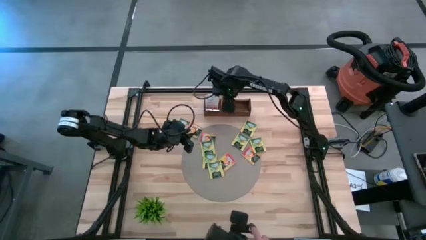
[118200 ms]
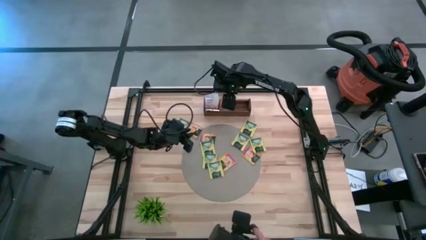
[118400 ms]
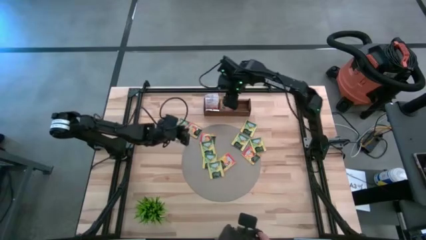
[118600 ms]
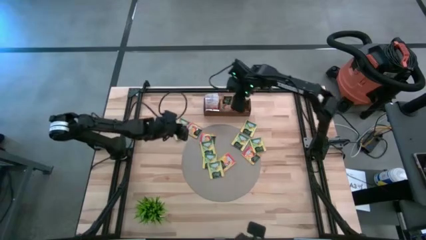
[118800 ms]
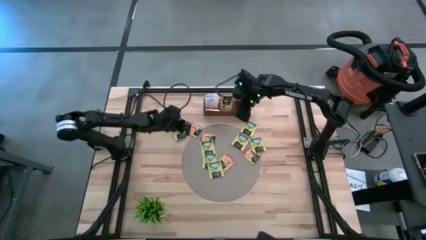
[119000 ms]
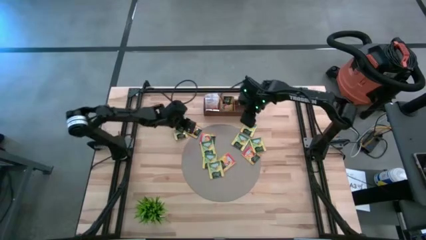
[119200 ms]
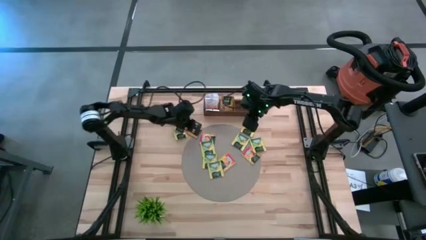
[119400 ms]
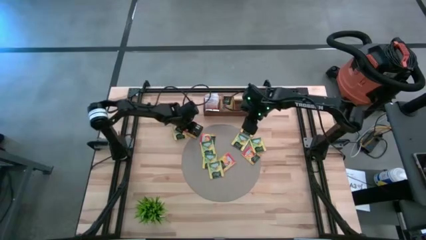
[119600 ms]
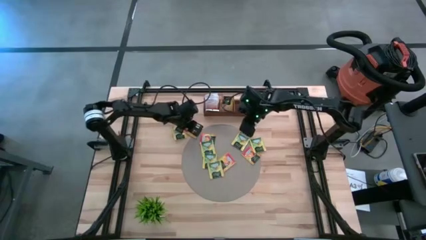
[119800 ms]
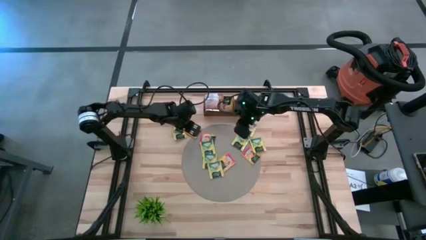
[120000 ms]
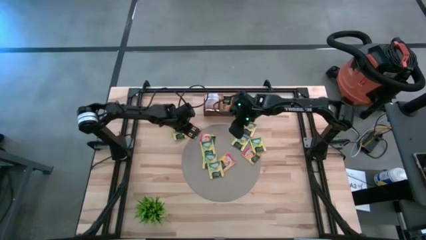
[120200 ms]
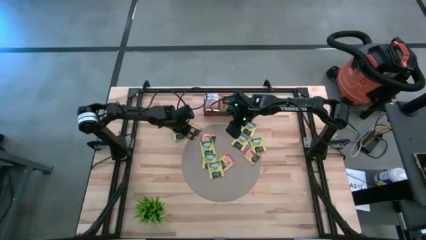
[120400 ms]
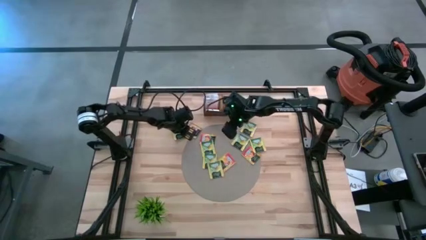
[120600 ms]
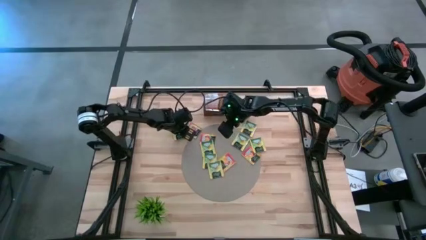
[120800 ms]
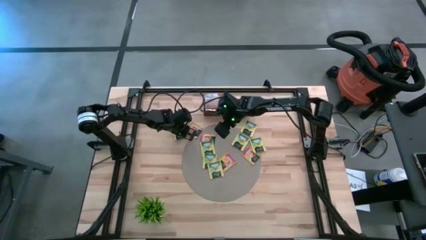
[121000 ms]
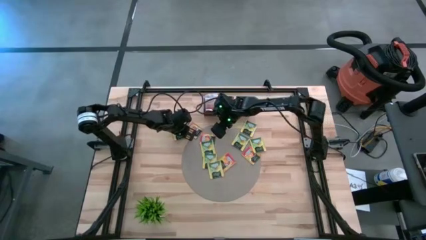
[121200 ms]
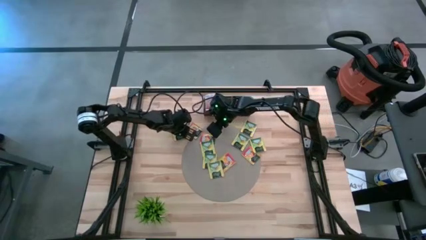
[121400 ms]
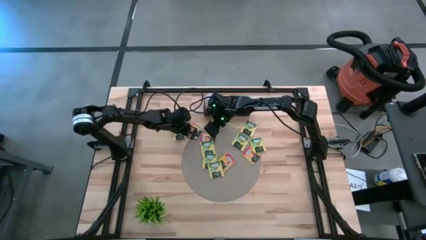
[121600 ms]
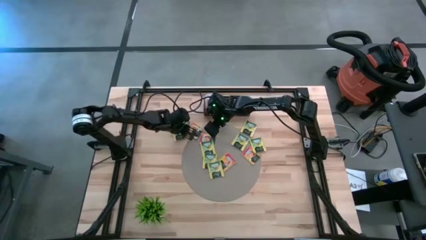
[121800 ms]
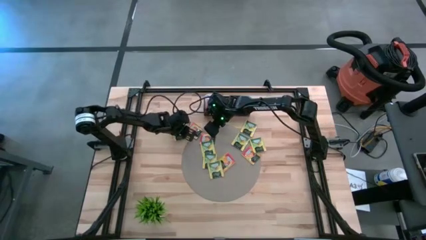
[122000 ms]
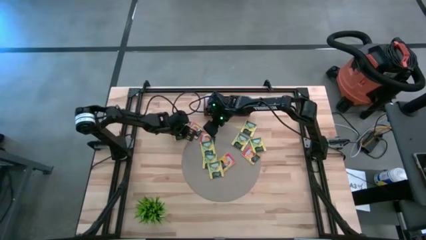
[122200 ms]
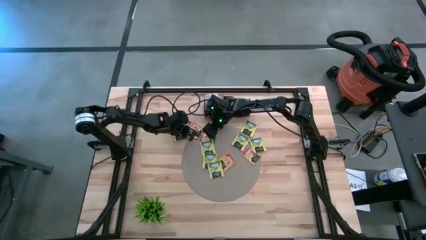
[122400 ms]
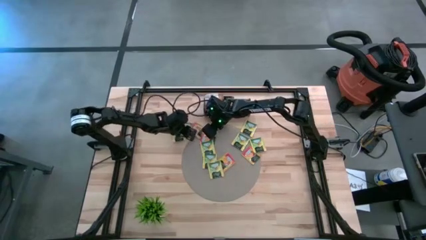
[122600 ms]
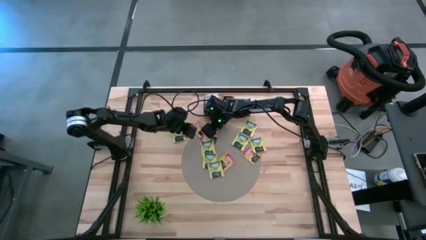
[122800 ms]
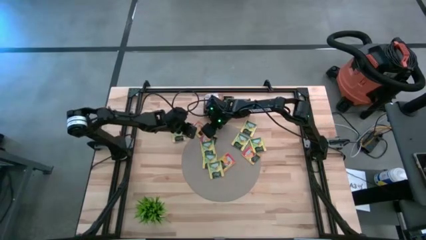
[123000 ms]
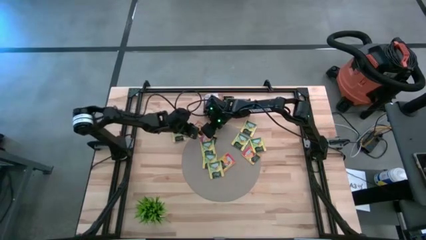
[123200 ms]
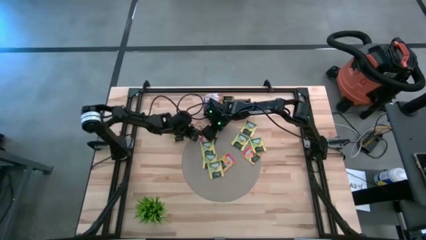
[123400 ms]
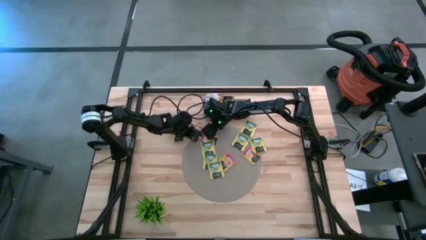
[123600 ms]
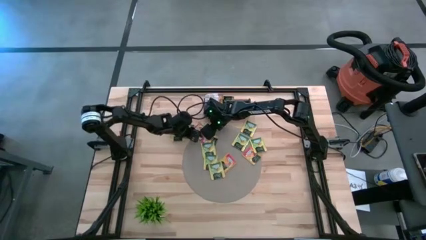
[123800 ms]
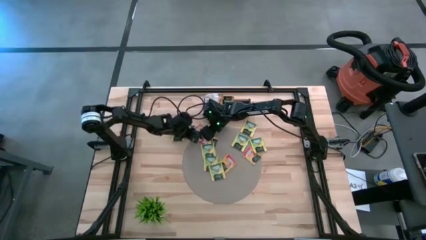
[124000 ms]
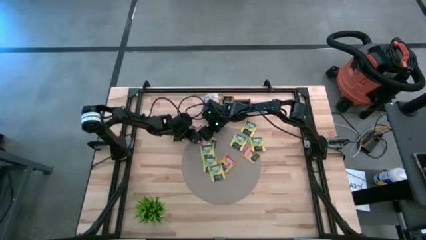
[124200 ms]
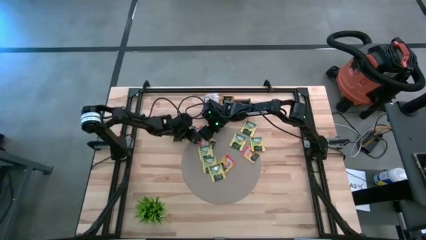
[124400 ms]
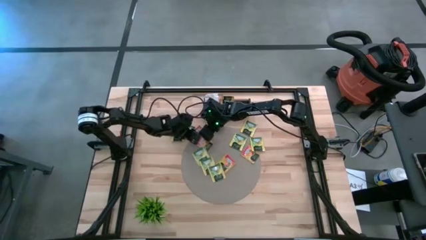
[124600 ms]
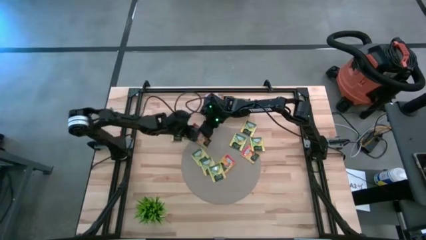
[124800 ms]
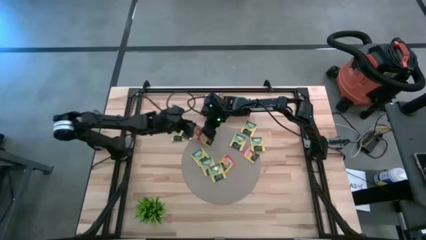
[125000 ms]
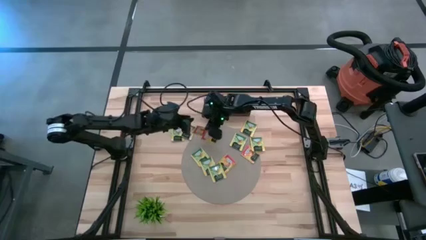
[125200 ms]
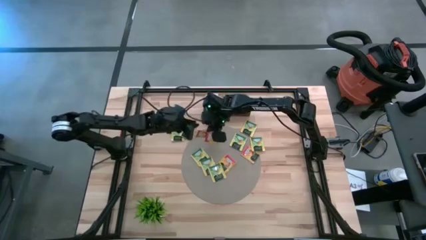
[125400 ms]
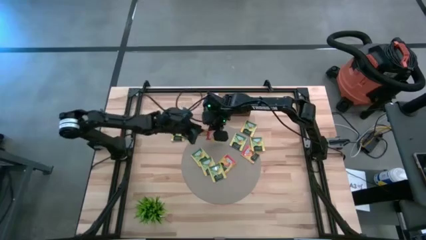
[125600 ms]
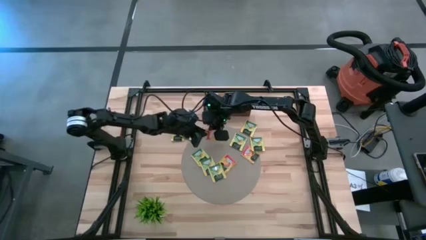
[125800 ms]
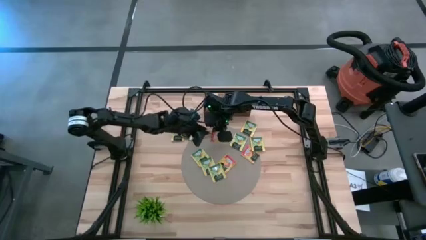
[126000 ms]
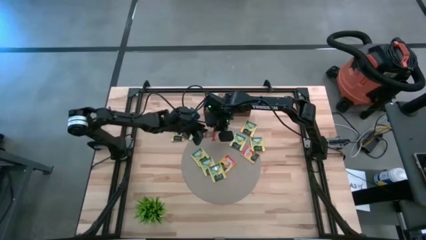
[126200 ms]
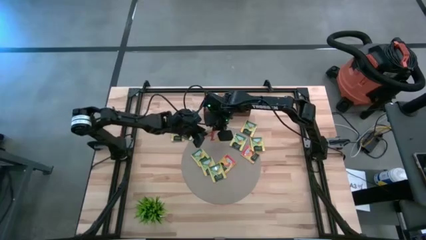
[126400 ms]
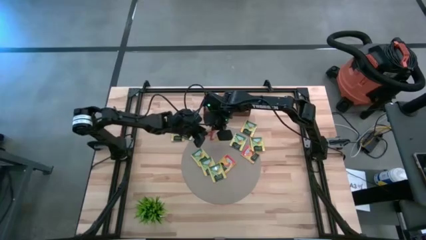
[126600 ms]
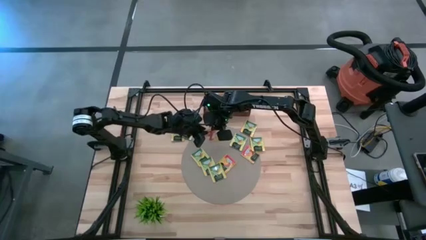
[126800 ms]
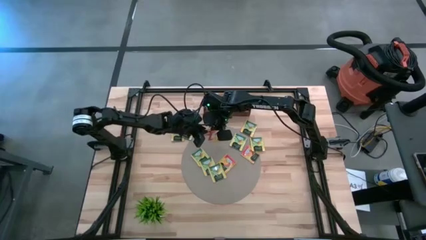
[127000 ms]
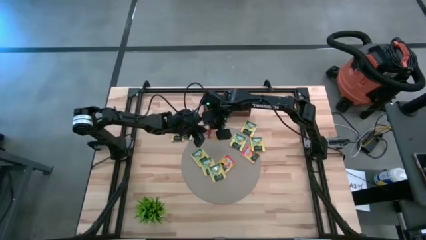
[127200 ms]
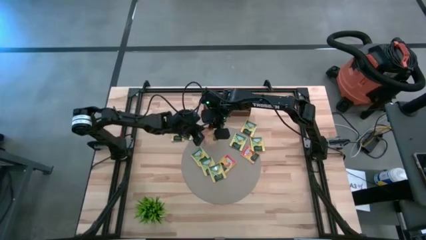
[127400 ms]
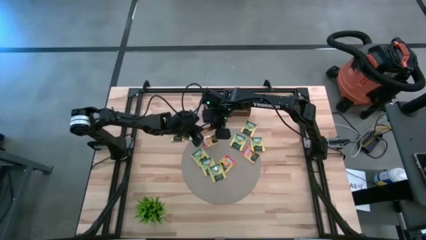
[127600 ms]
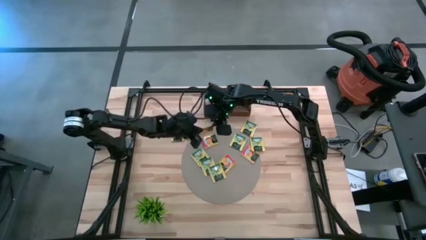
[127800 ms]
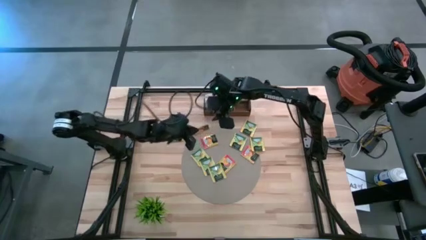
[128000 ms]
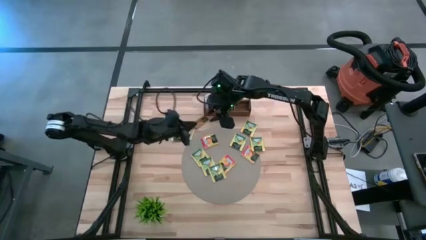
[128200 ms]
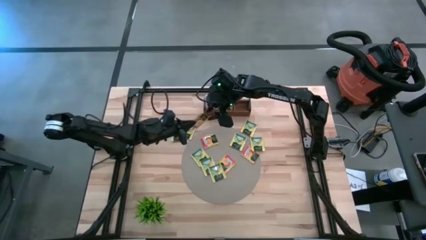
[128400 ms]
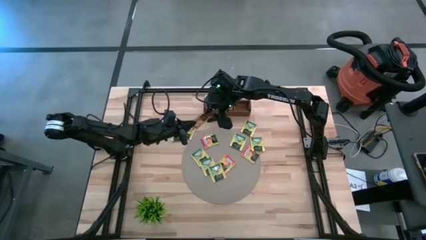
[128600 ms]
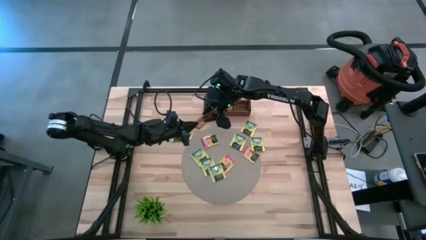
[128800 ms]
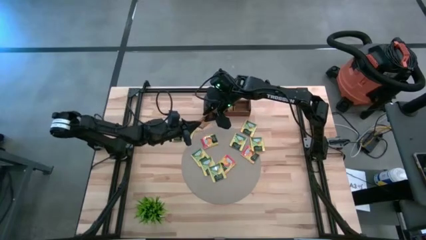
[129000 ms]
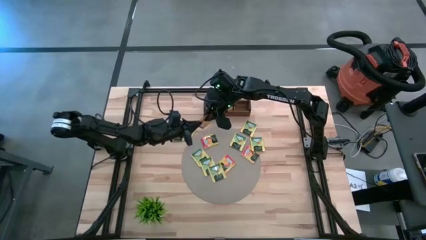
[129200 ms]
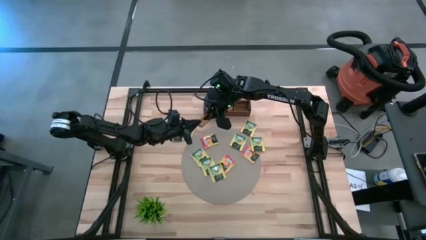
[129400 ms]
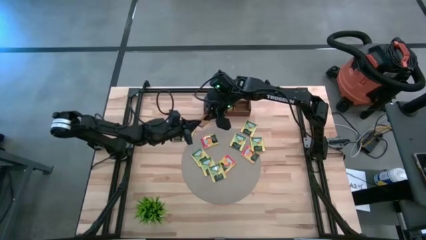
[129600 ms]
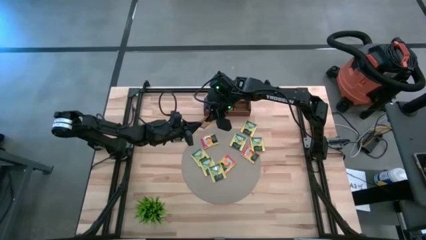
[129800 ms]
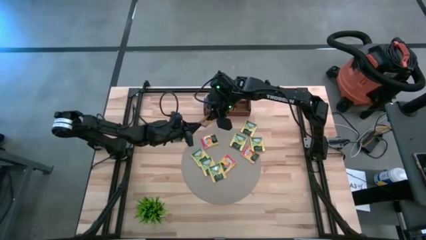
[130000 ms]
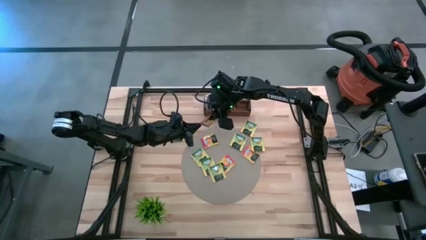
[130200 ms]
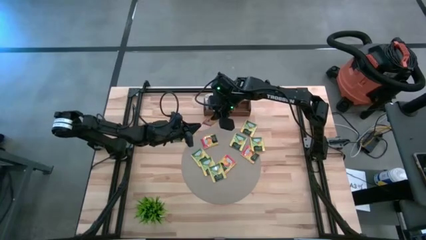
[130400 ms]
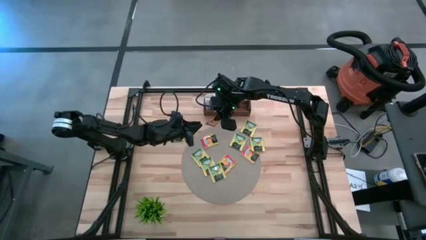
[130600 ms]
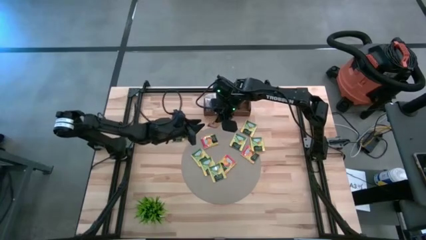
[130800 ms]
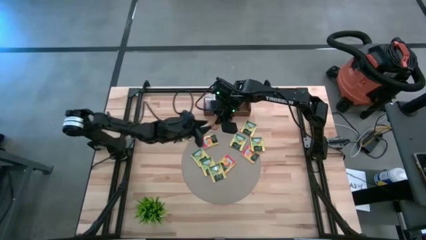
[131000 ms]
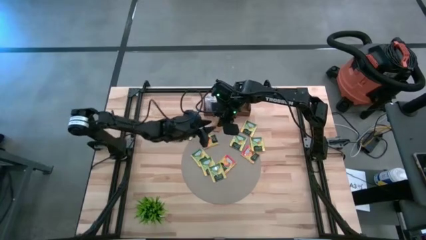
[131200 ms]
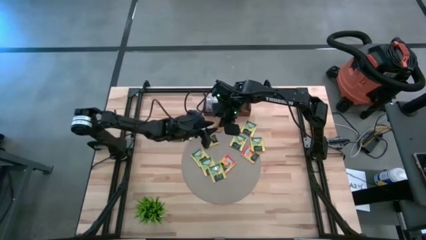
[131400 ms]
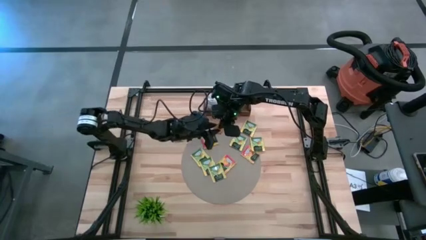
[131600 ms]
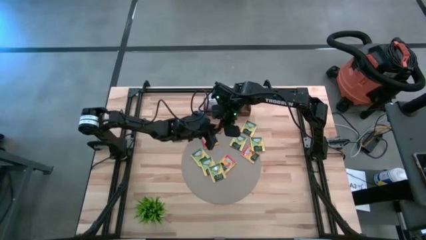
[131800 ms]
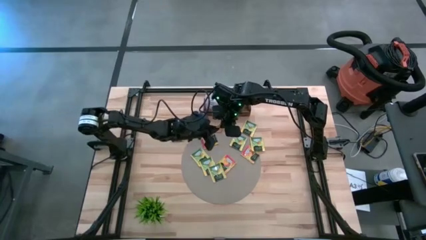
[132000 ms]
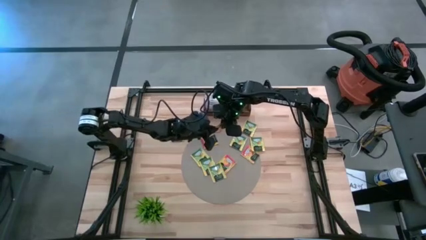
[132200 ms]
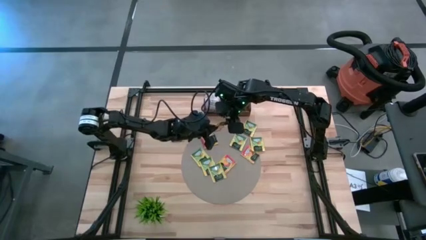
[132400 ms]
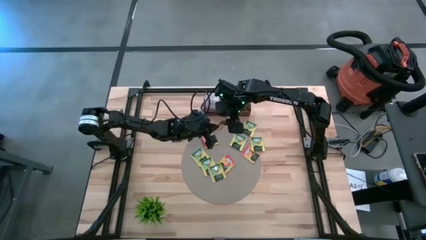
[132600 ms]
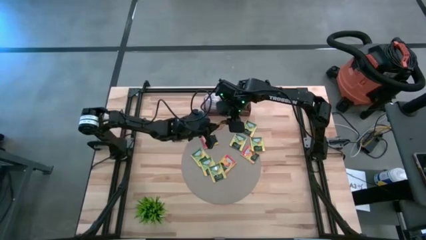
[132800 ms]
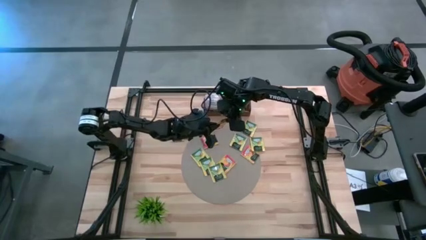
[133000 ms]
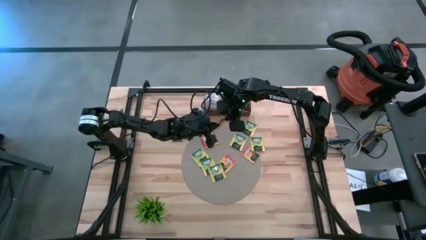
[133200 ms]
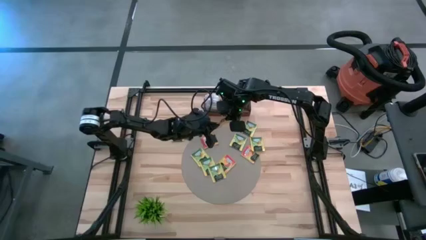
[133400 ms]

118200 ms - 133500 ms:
Task: Pick & Place Tea
Put the orange tea bag into the middle section of the wooden organizer
